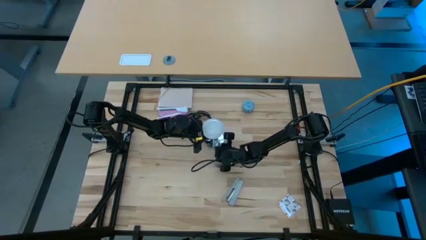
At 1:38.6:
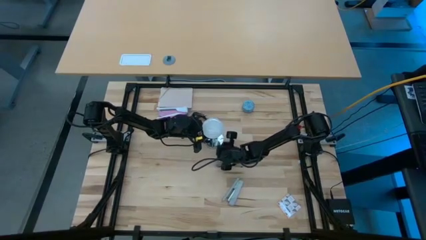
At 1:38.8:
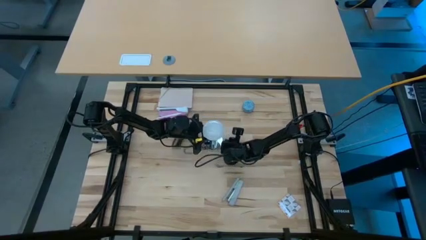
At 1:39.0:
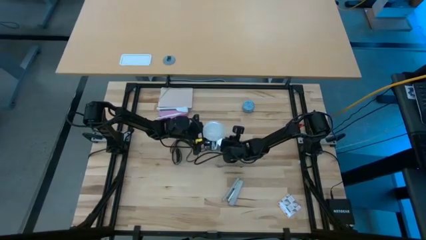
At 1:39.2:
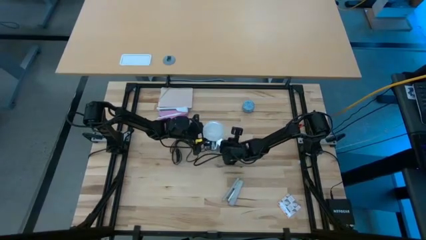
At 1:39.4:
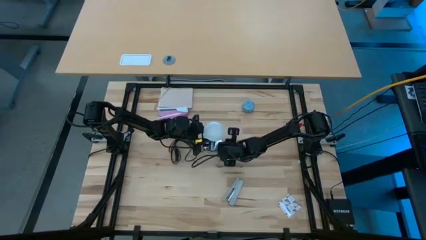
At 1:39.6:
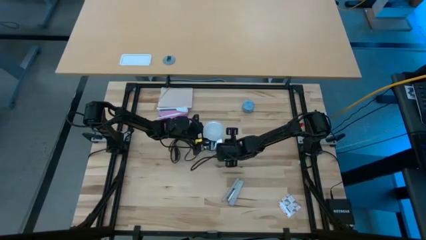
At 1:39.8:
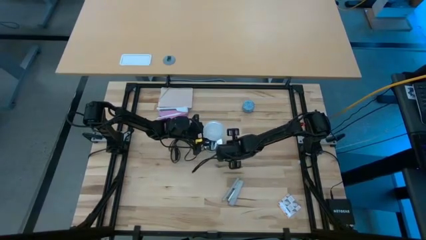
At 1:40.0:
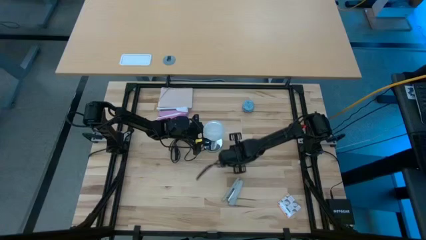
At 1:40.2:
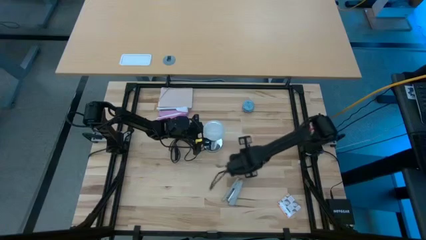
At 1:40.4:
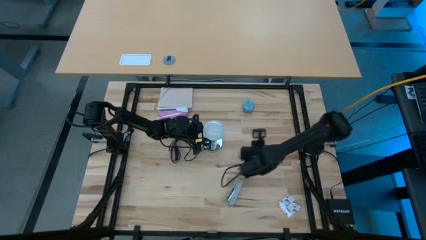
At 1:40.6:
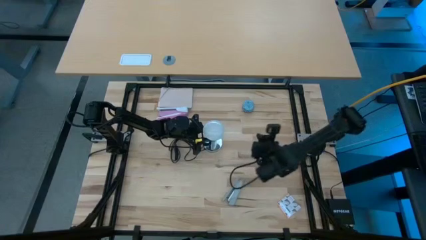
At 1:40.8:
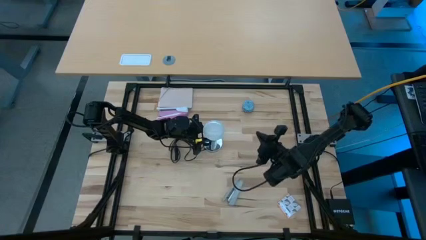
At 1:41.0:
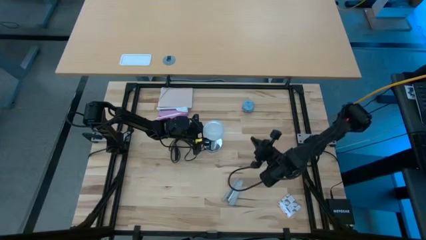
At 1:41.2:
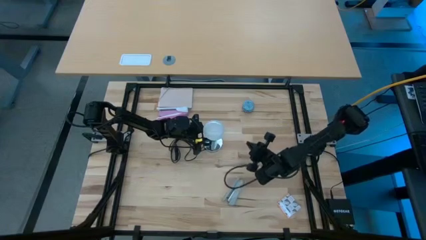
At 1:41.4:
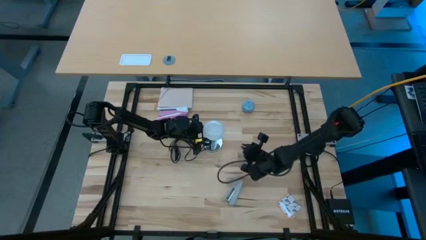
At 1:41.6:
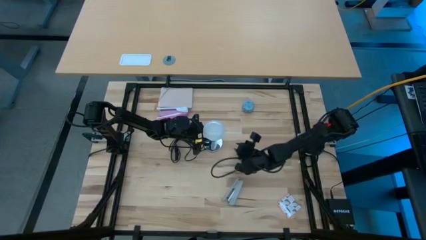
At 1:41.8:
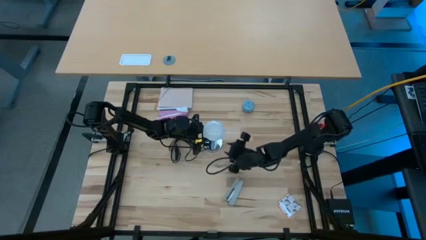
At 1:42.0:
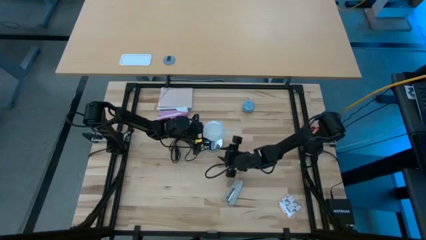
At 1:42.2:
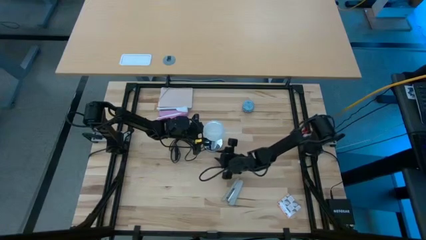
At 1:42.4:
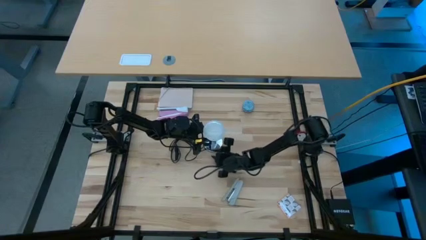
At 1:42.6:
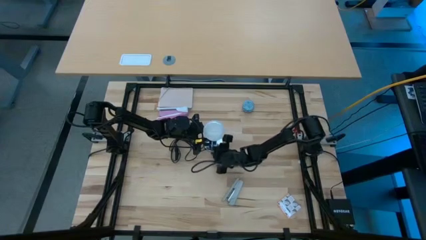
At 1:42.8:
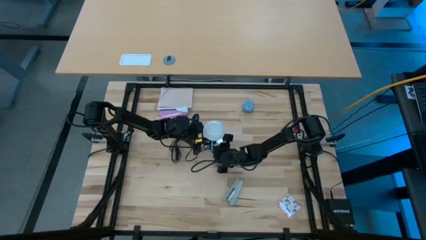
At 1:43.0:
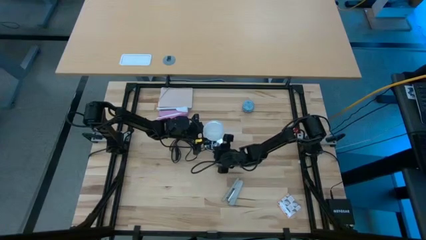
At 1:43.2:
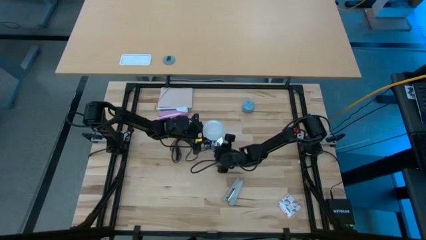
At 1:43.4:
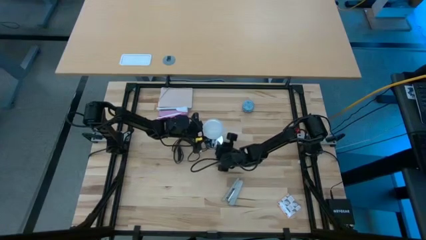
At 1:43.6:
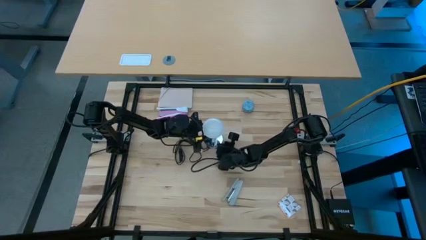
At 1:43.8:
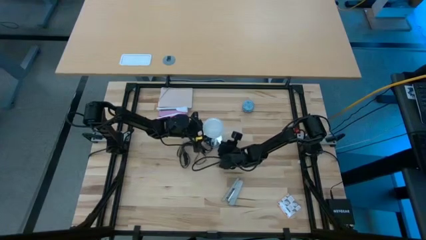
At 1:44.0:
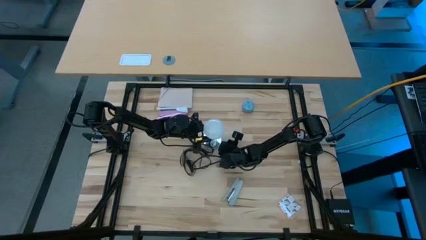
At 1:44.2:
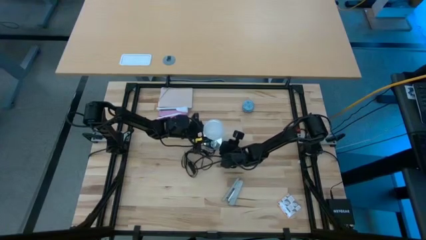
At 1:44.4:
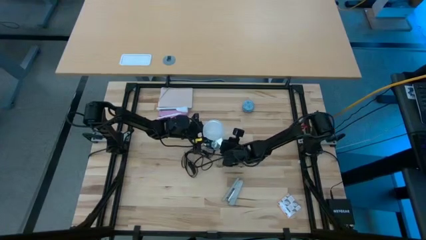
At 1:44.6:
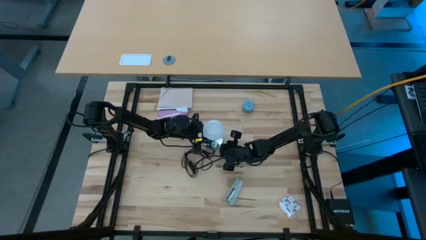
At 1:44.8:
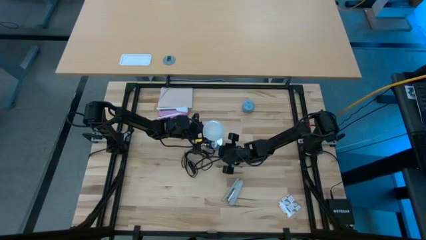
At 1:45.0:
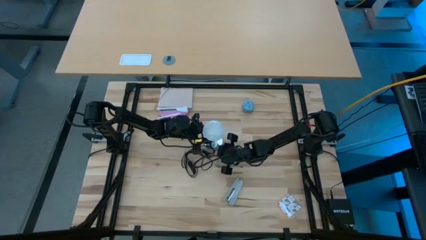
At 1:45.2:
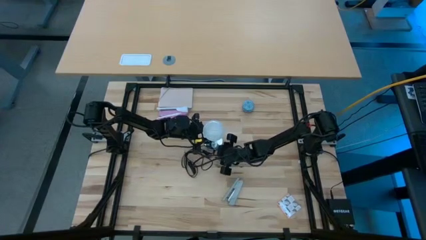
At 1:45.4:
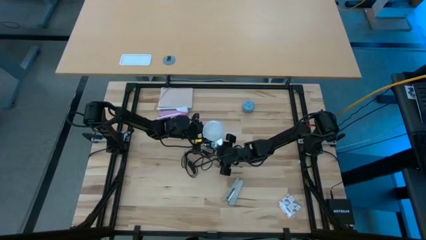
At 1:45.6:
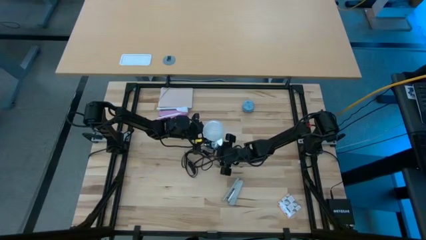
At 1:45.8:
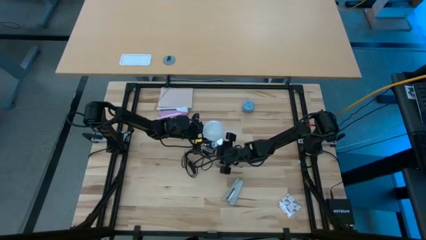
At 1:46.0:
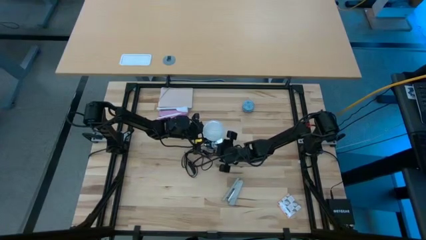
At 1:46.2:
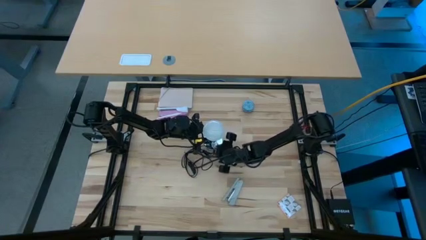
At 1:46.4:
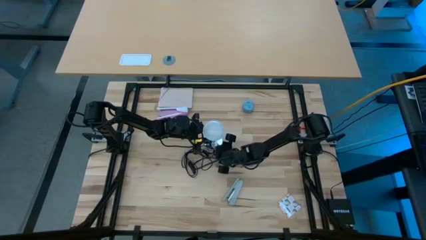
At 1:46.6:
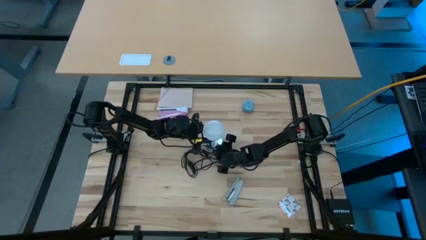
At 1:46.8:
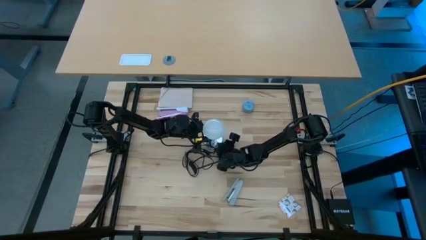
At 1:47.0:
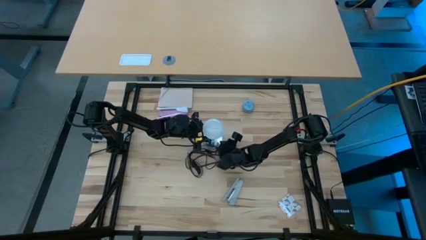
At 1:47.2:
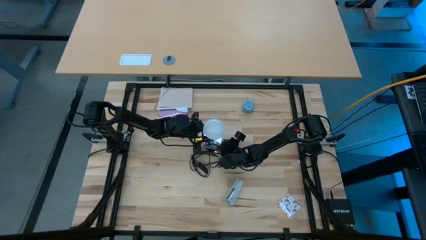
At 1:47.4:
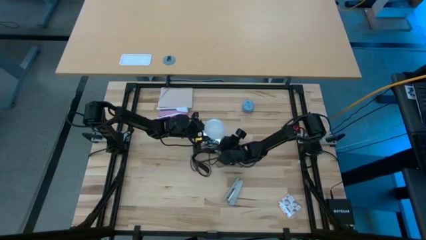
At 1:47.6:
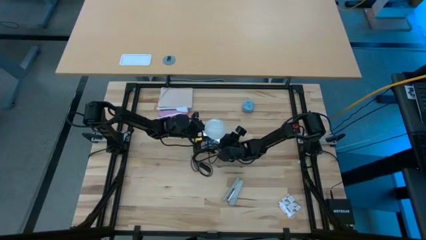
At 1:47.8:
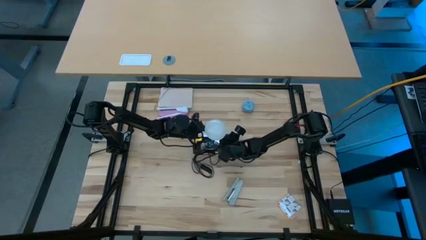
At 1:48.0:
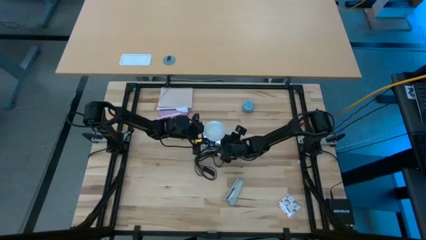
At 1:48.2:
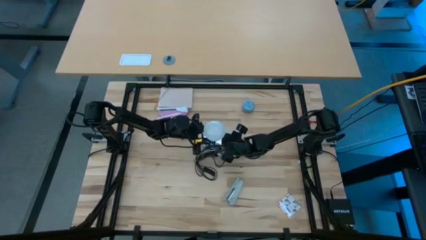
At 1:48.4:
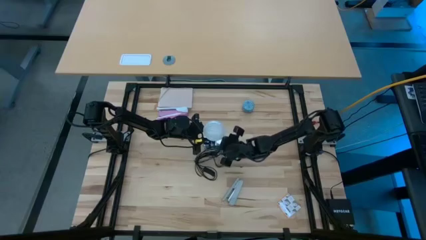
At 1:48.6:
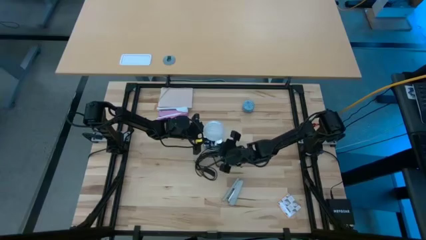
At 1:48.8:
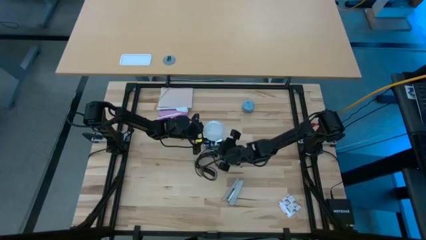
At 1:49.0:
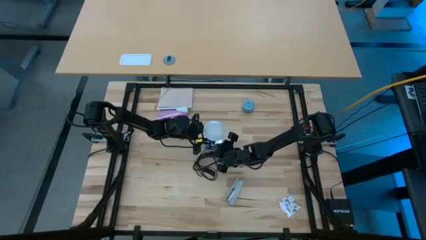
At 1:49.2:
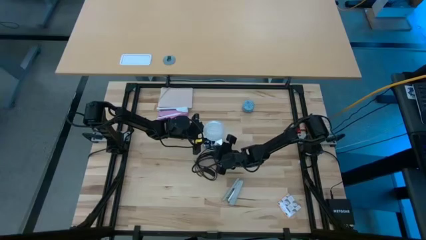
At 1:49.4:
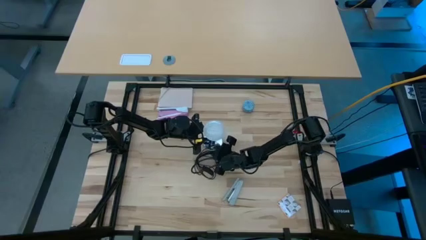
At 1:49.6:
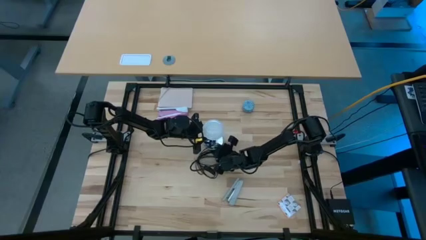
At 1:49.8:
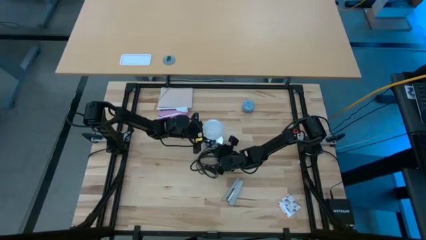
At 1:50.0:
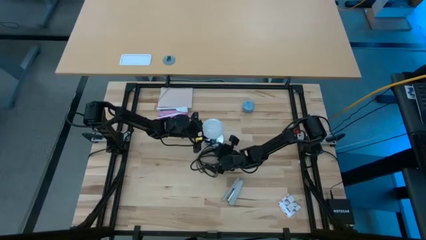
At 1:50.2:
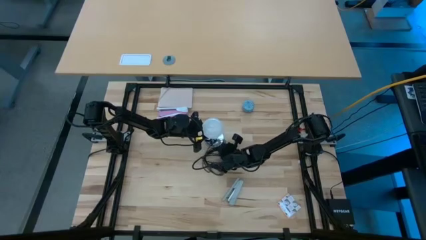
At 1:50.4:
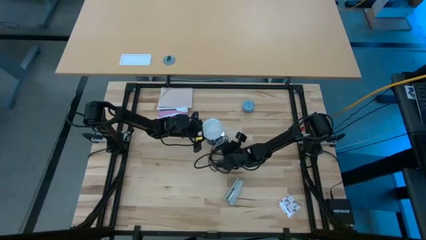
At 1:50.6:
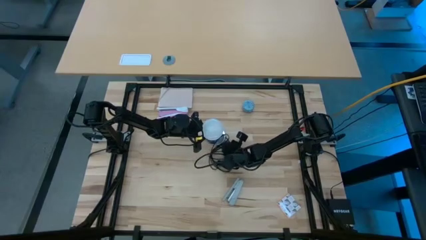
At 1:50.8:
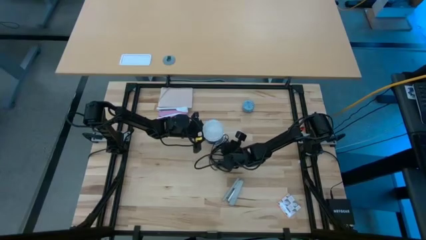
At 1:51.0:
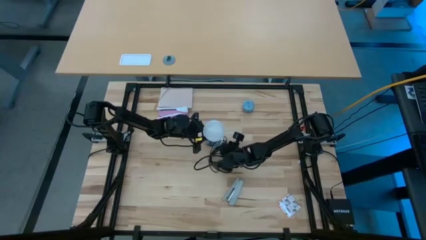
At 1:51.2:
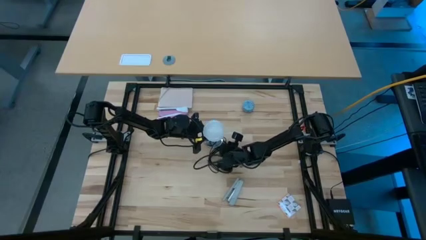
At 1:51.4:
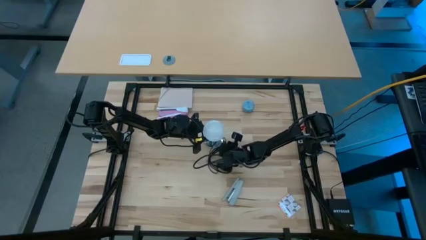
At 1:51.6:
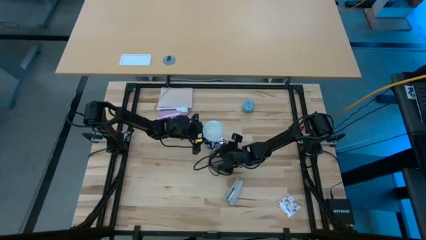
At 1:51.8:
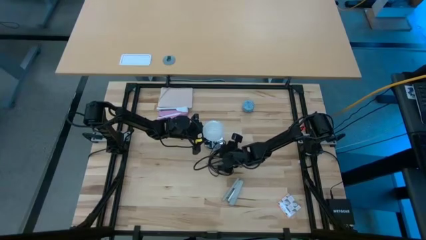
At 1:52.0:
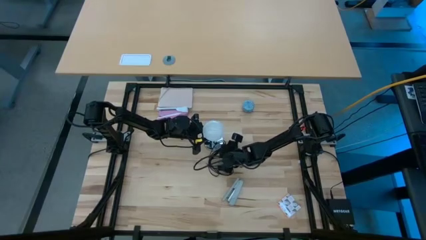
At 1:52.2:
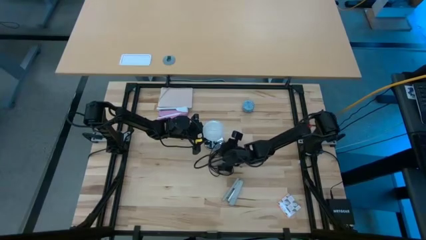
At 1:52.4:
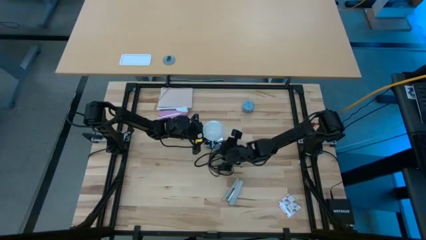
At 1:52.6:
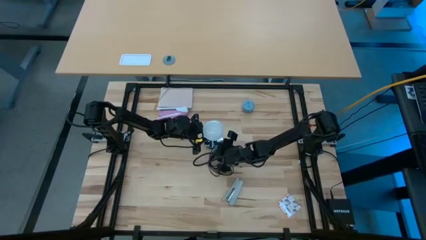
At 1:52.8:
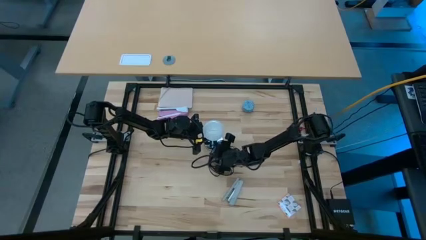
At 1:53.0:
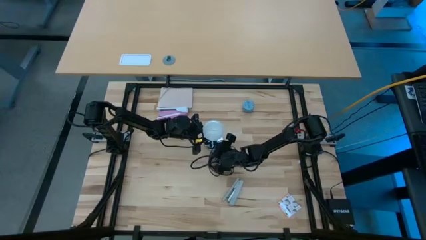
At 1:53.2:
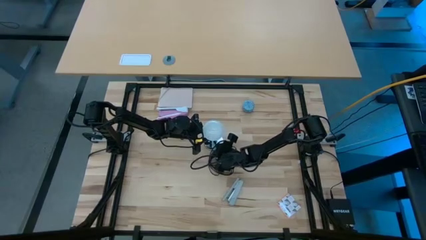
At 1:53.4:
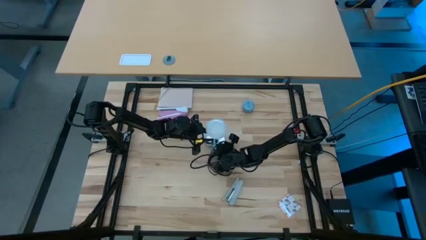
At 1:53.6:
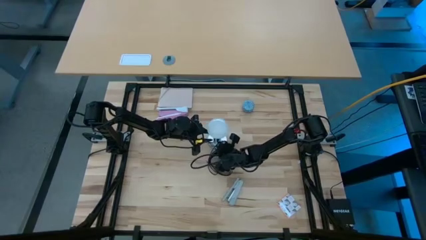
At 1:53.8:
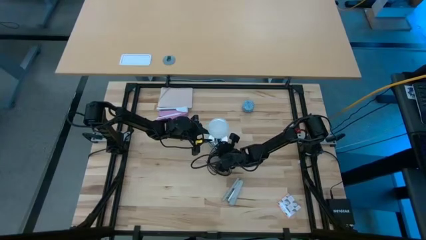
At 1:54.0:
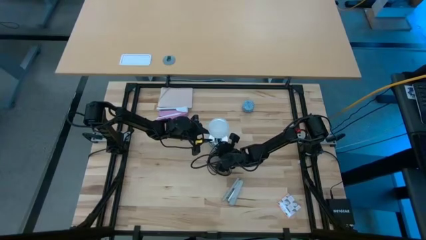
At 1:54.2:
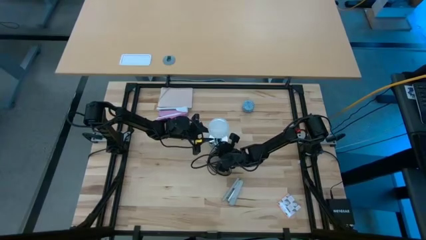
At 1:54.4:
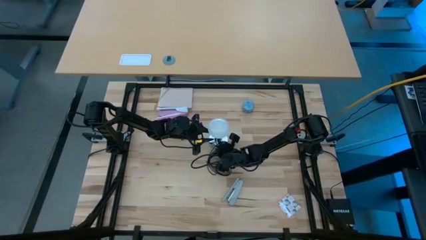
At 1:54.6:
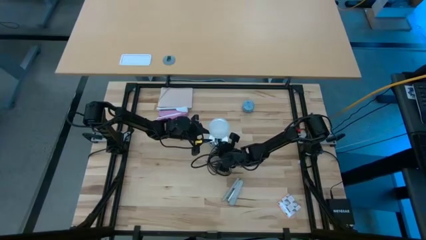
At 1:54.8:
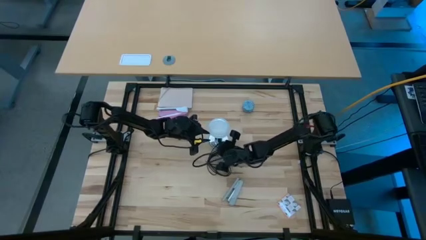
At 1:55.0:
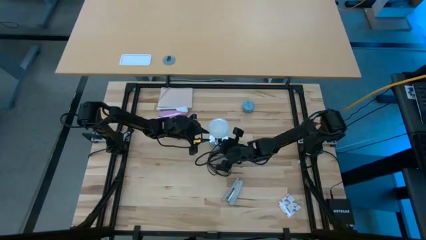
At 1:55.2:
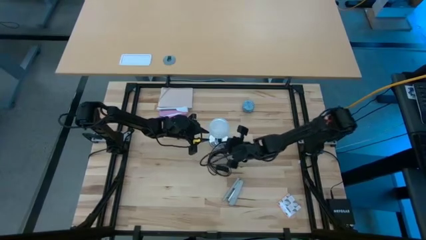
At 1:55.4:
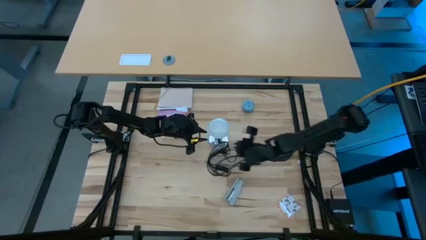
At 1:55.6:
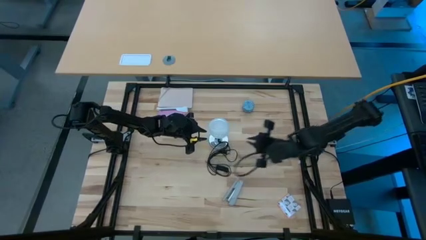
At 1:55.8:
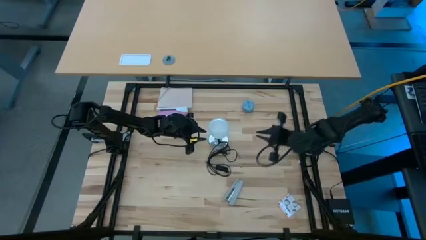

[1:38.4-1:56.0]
Task: Screw lightbulb
Insert light bulb into the lamp
